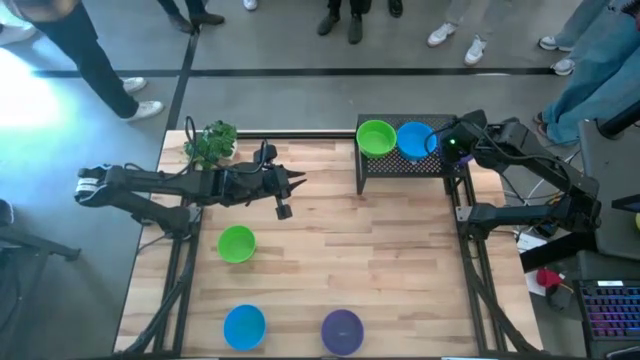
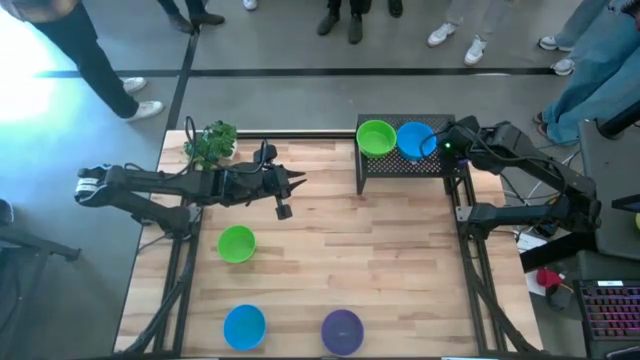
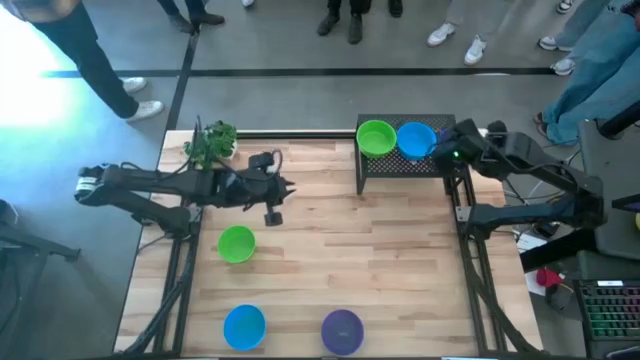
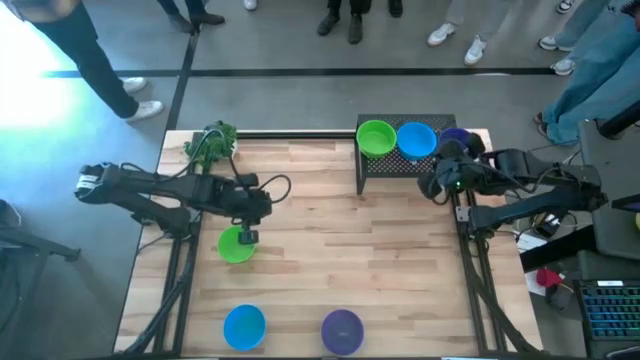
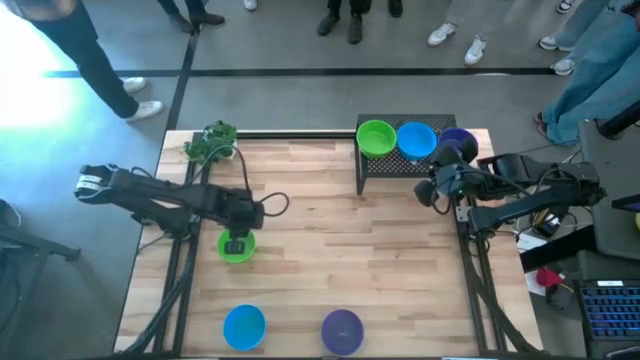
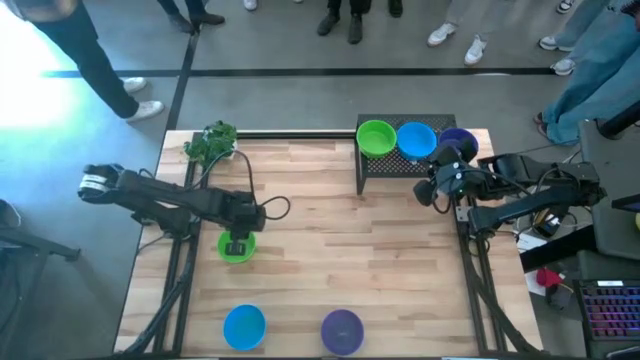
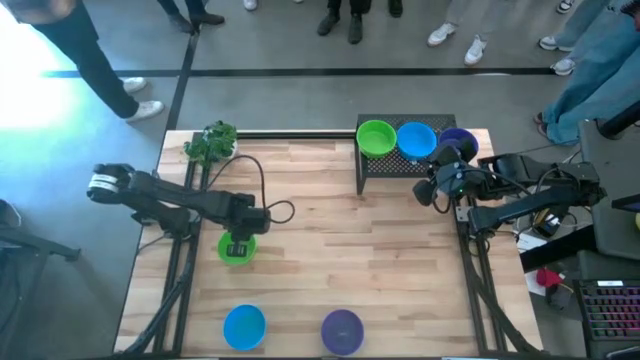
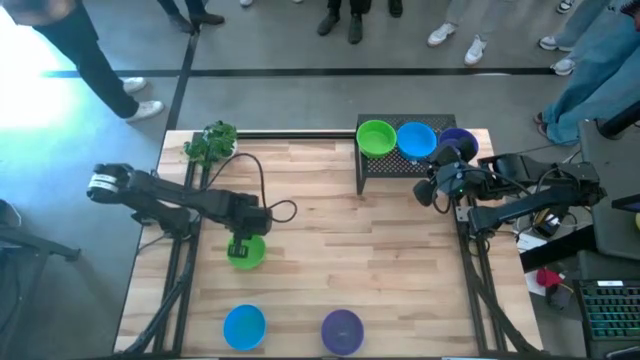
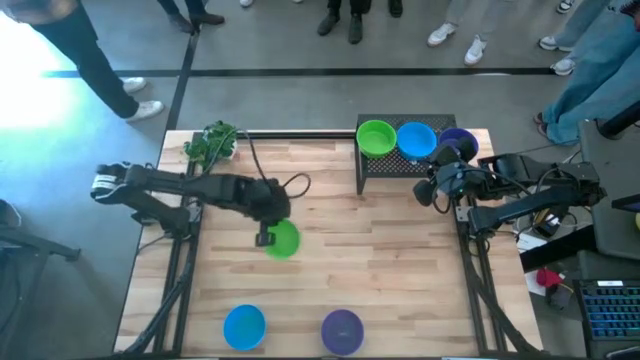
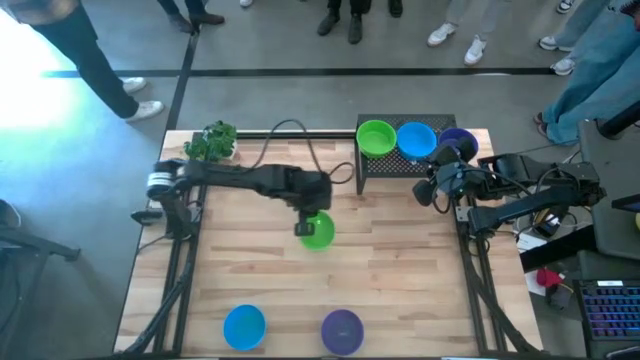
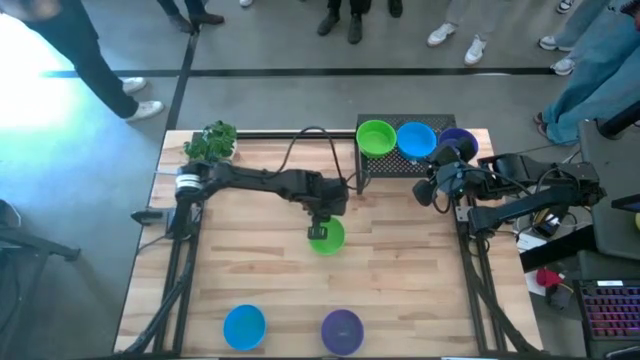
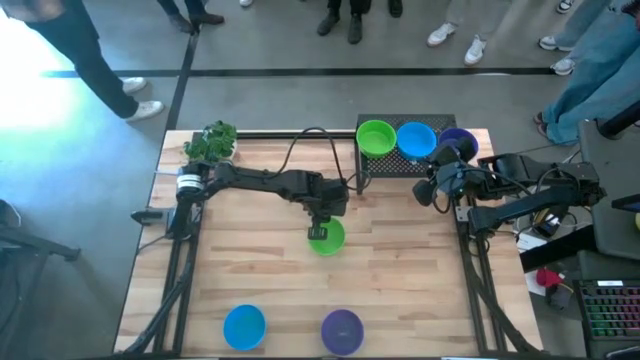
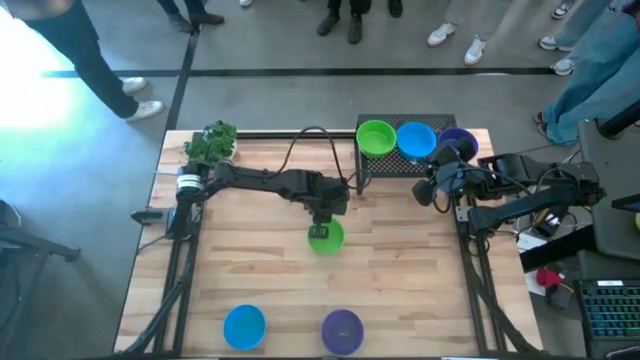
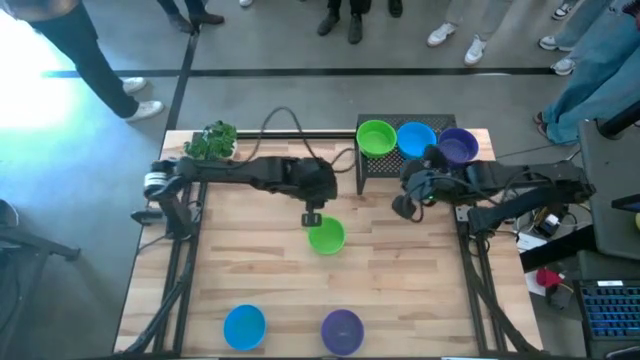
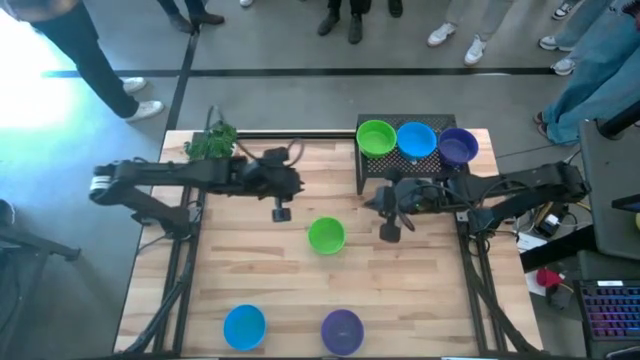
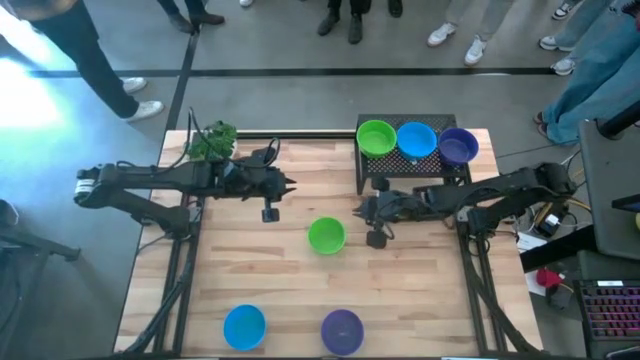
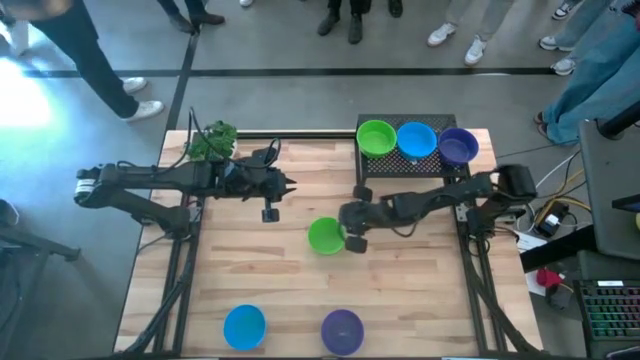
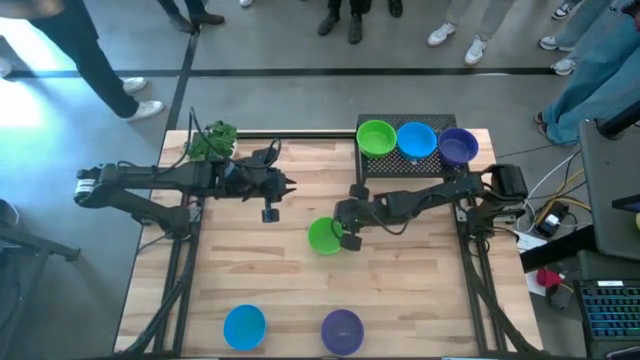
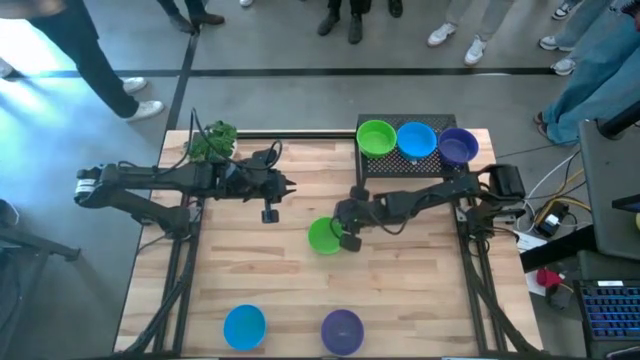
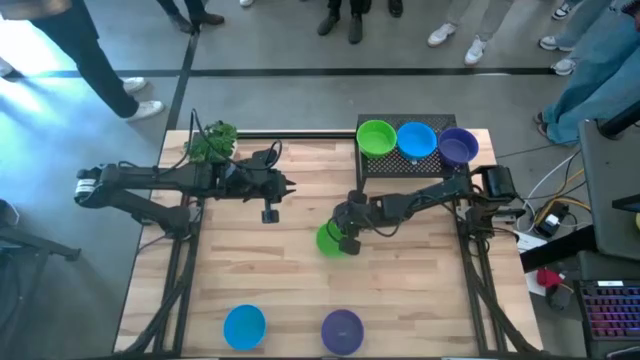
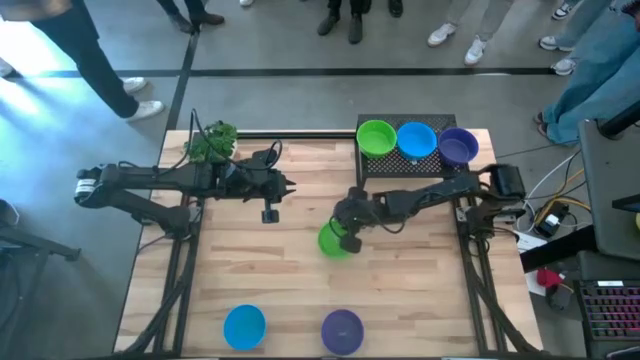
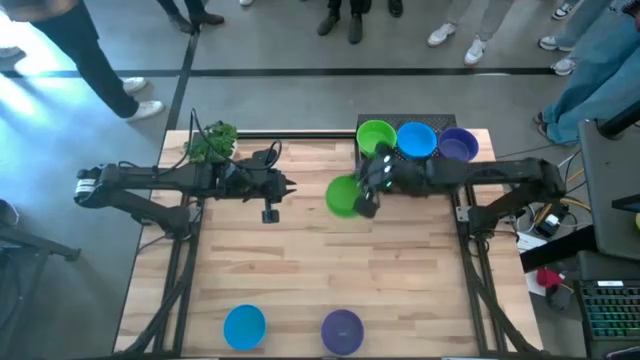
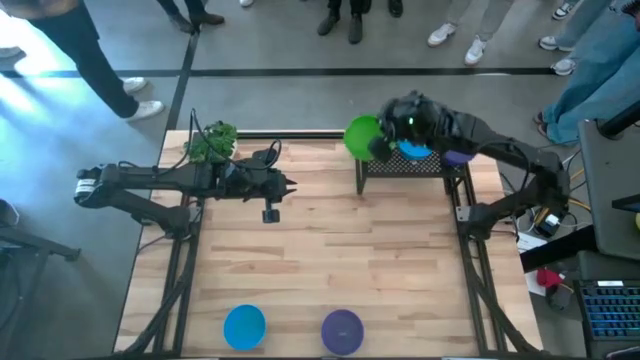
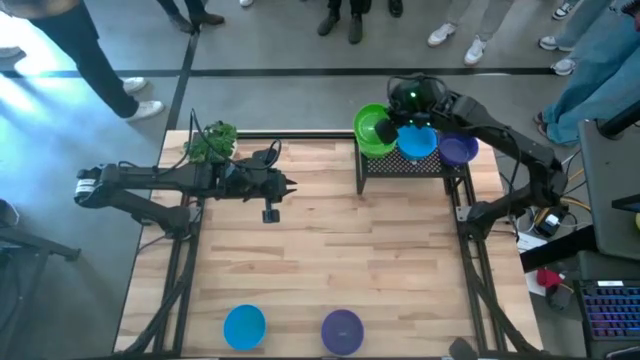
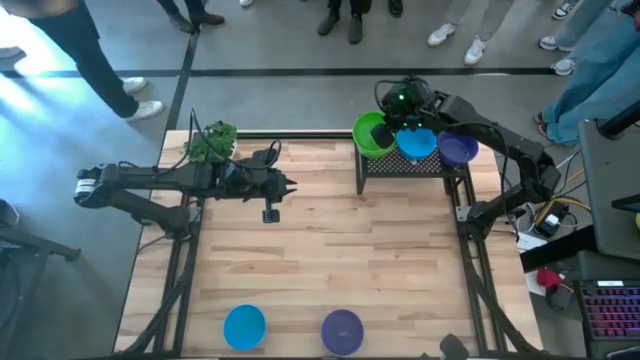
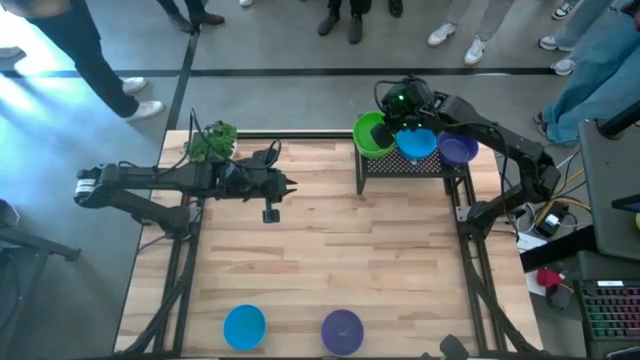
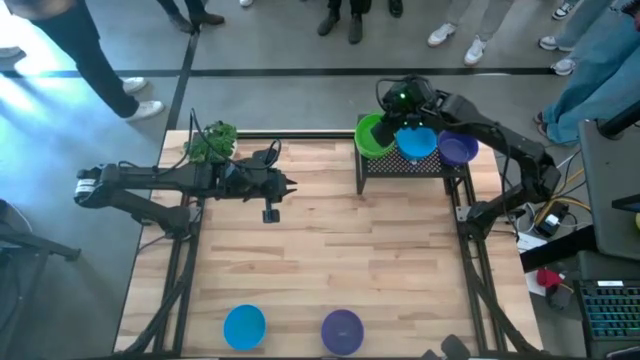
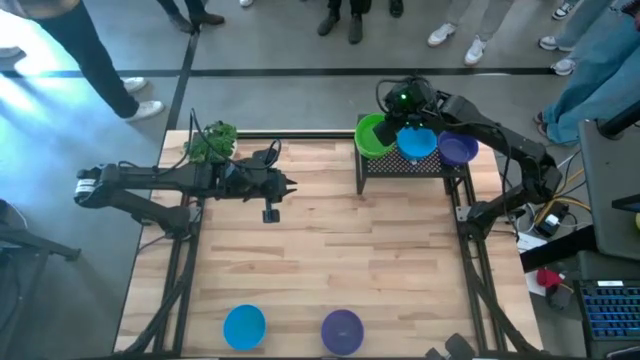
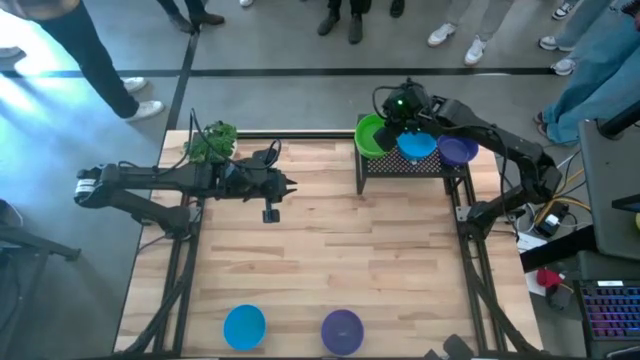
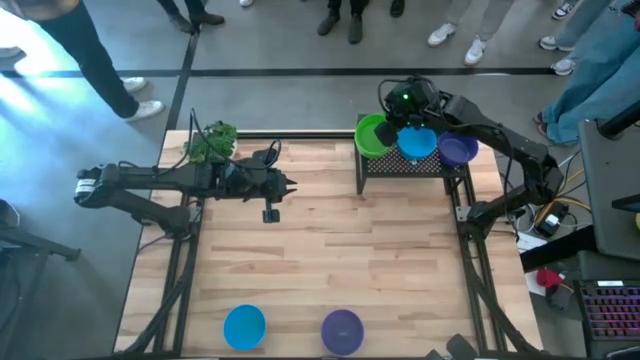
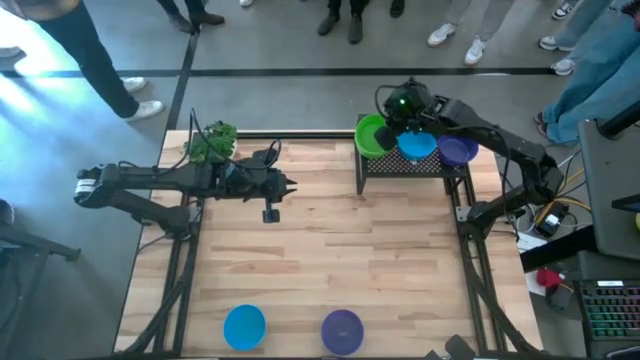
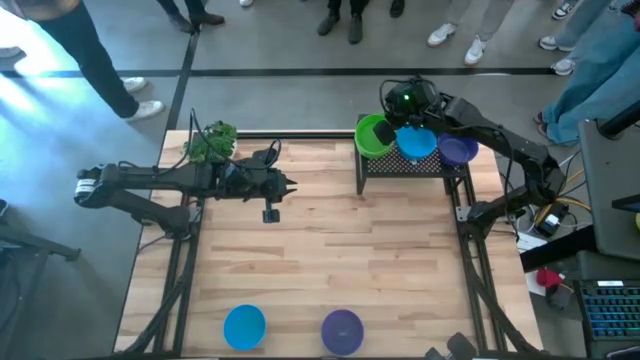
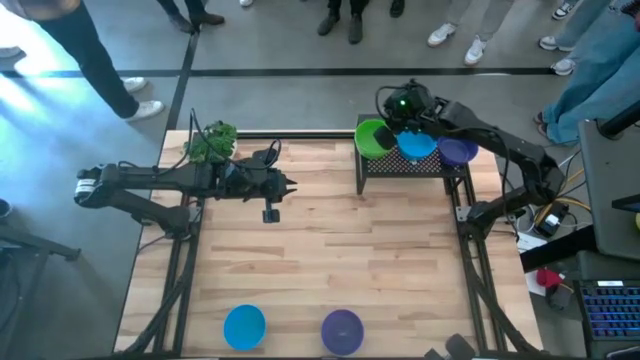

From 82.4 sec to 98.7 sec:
Task: Pick & Place Mini bowls
Stack the green bowl on top of the green bowl on the shelf

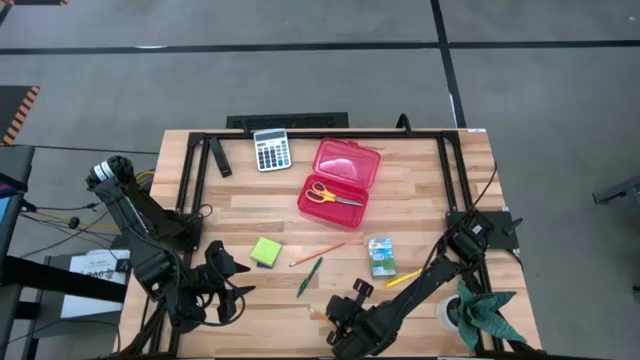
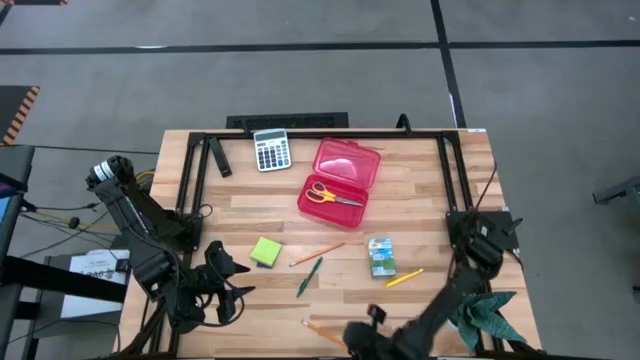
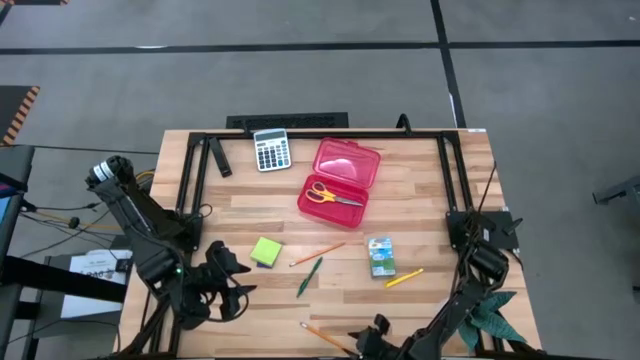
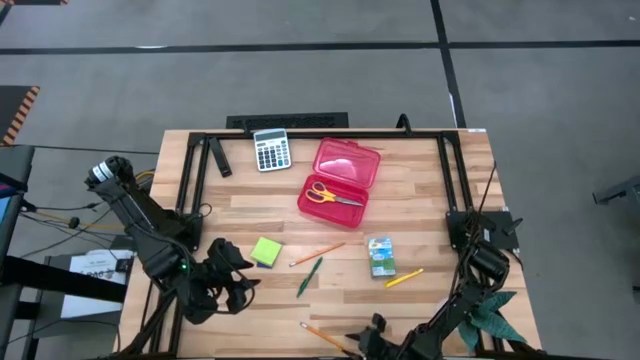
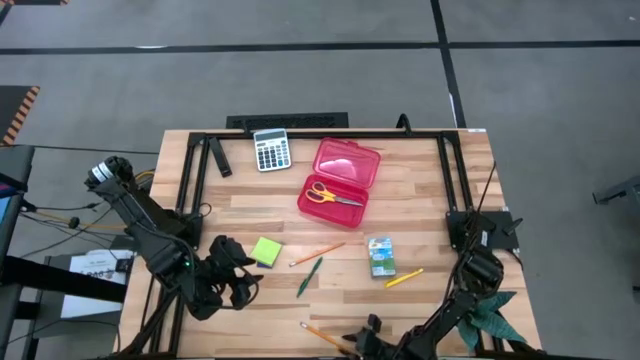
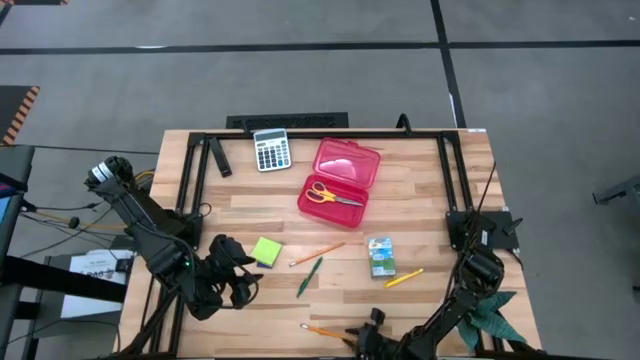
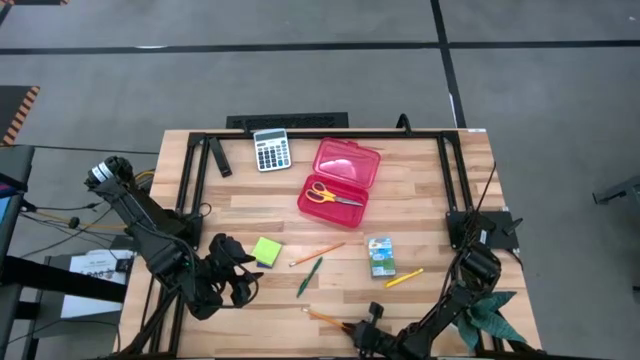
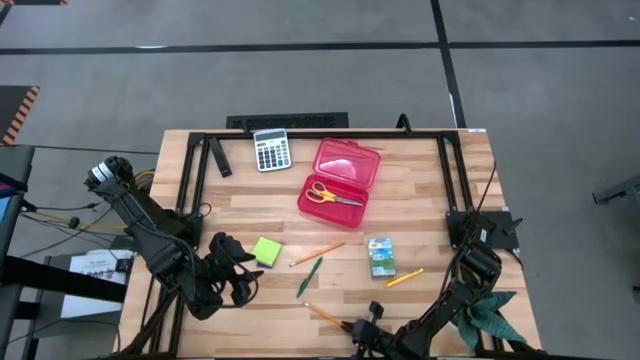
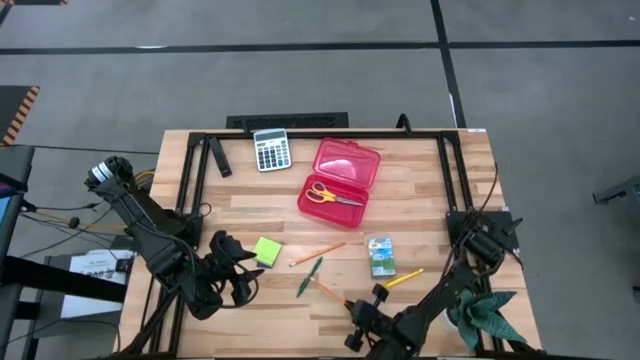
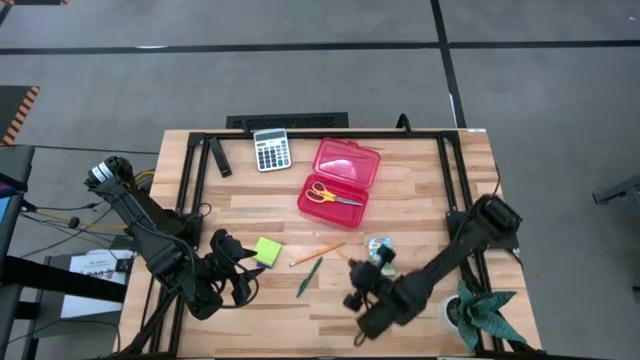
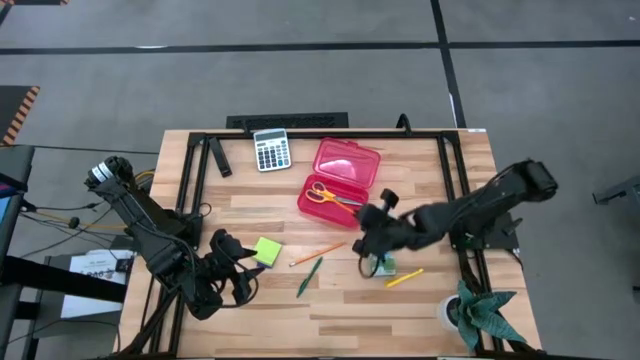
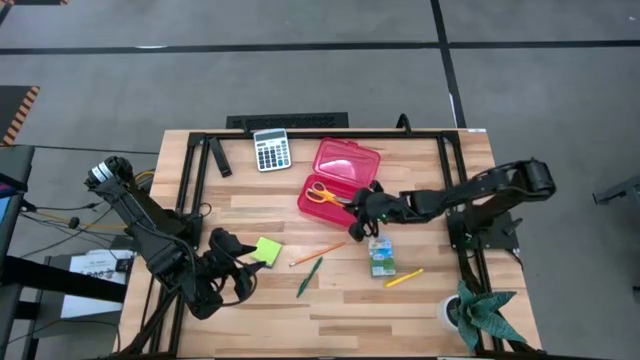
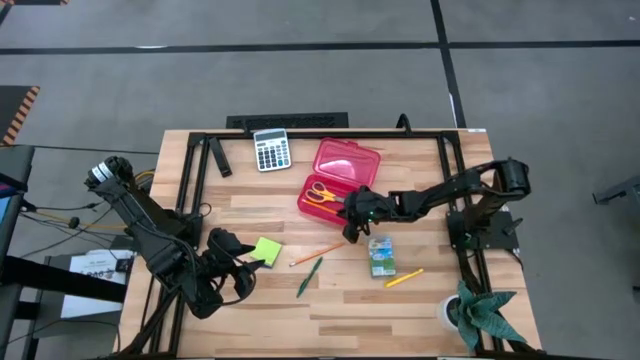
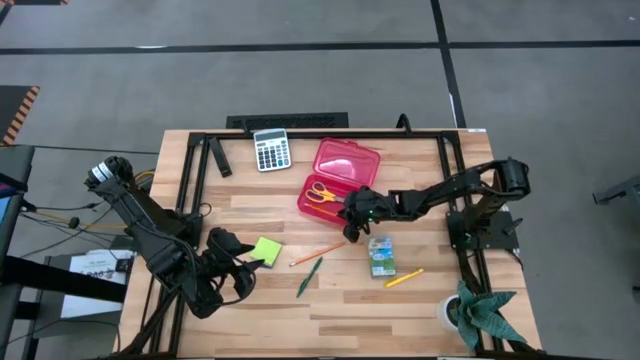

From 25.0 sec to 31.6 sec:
Task: Pack school essentials
Put the bottom yellow pencil into the supply box
